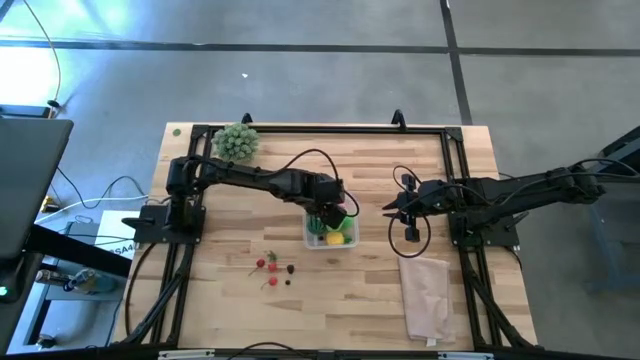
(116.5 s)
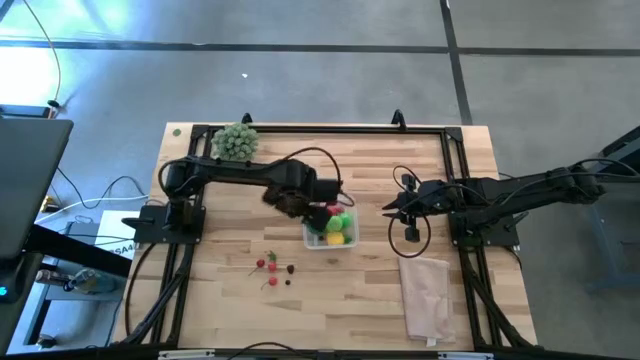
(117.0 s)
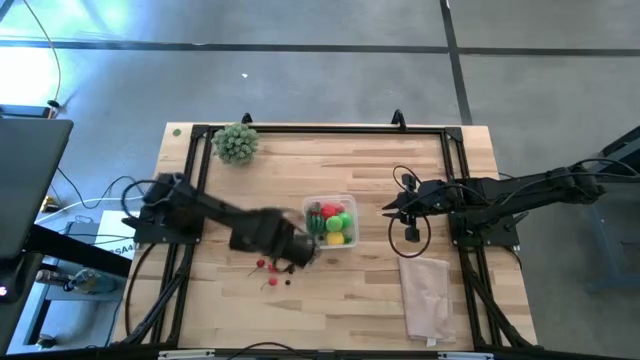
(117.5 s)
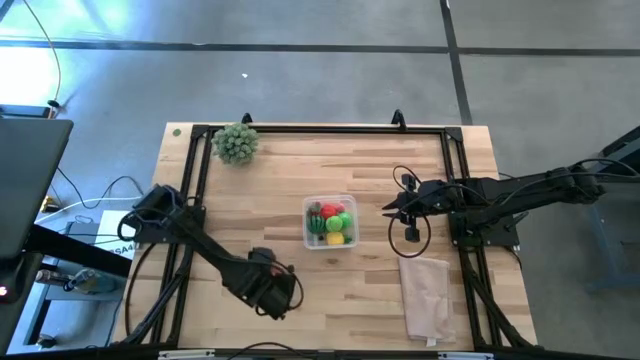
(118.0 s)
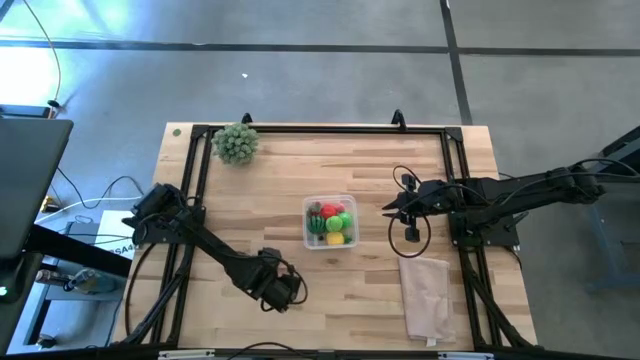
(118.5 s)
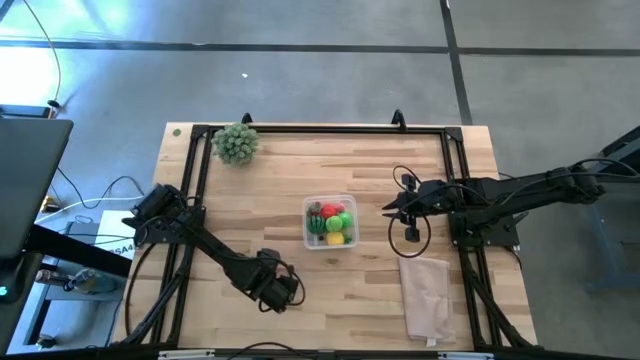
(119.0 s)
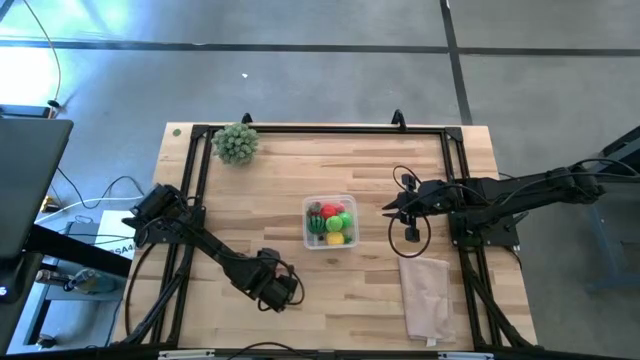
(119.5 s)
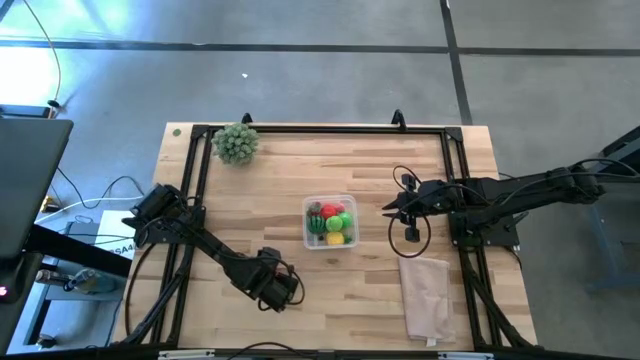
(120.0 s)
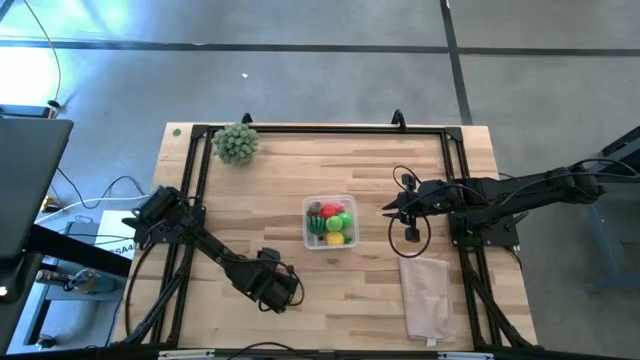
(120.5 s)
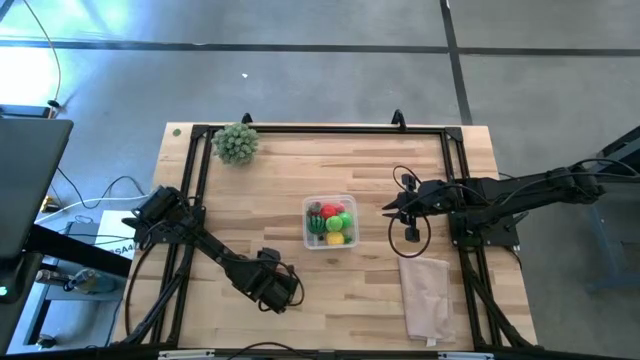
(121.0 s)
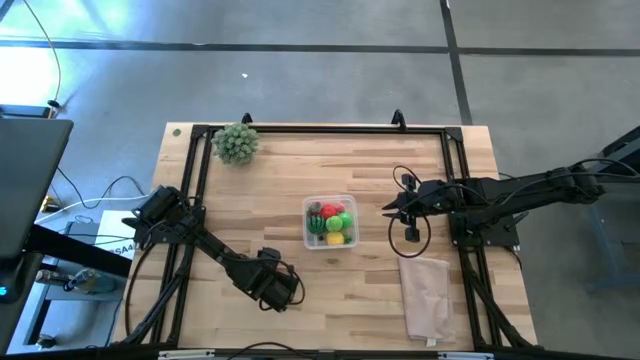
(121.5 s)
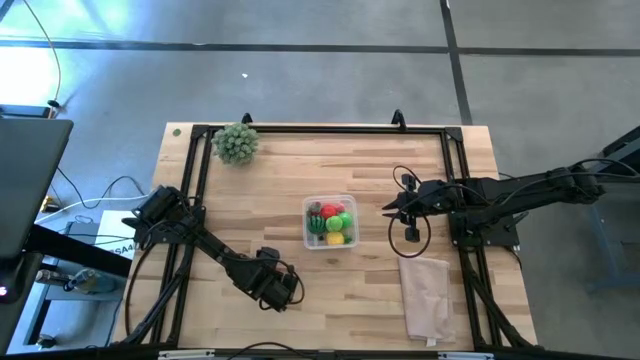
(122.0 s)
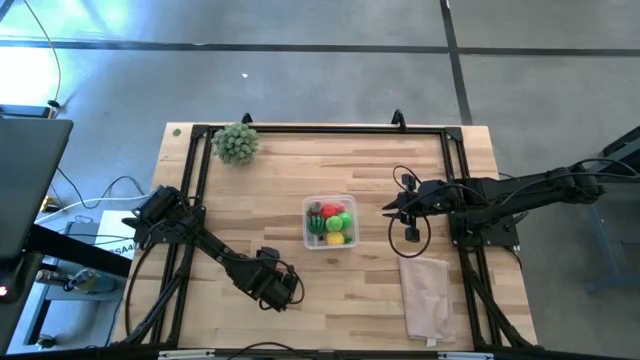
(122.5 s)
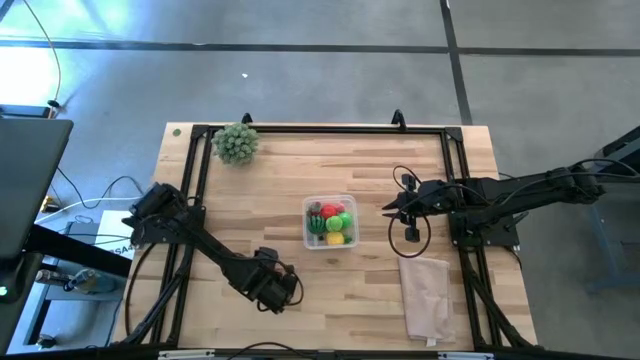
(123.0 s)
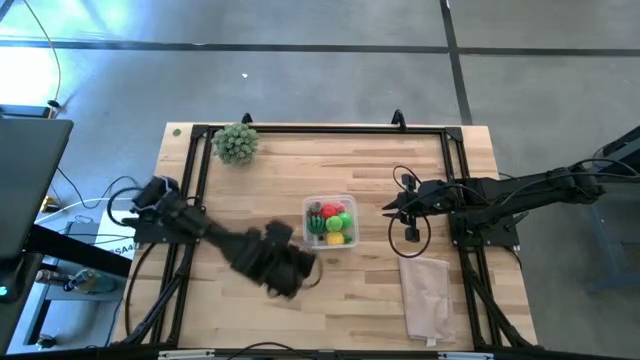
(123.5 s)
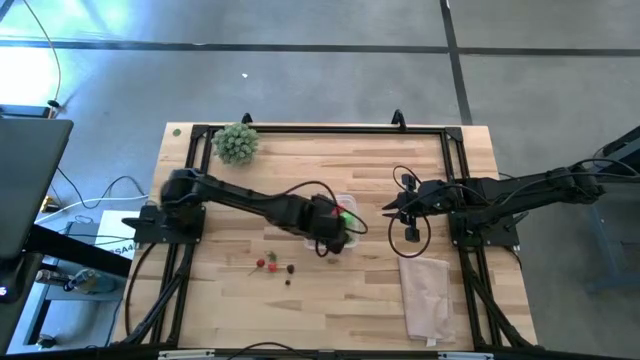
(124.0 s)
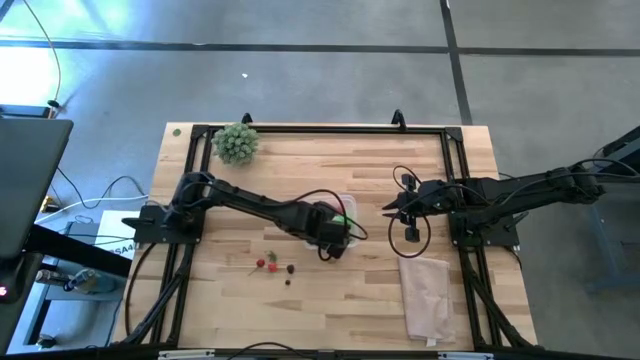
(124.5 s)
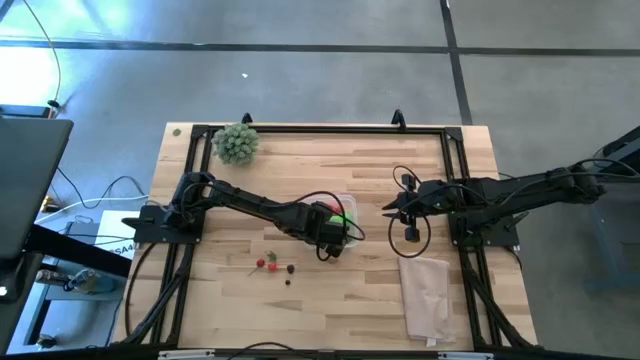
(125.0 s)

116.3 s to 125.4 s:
Task: Pick and placing Produce into tupperware
Put the bottom red cherry into the transparent bin

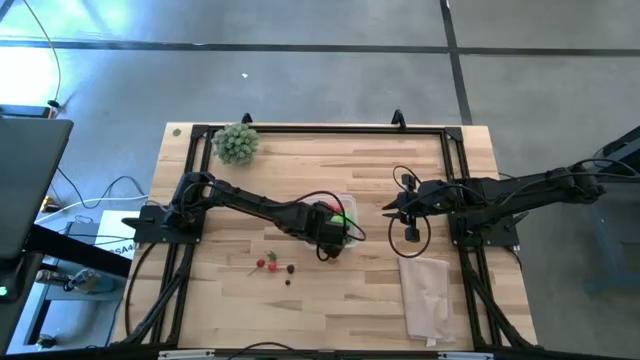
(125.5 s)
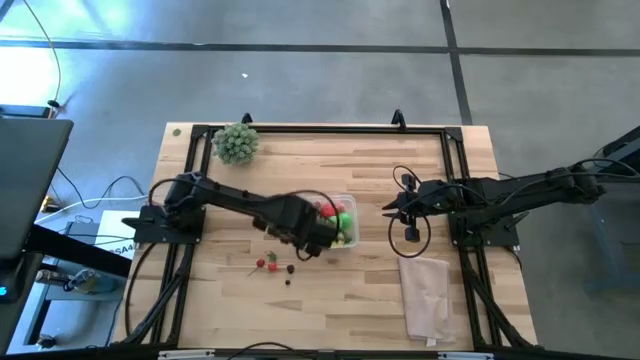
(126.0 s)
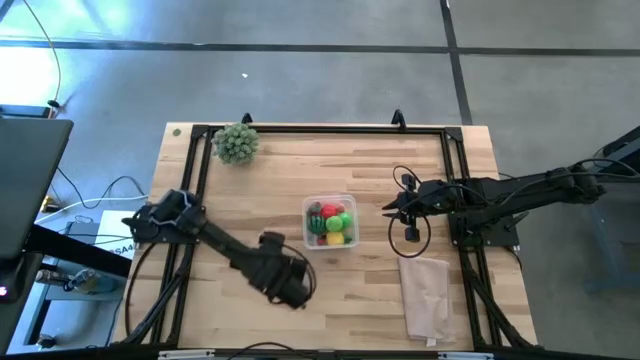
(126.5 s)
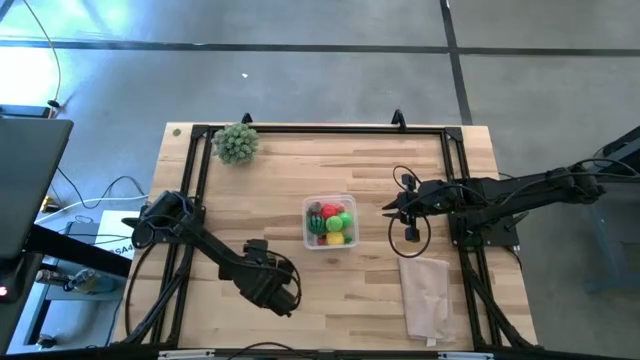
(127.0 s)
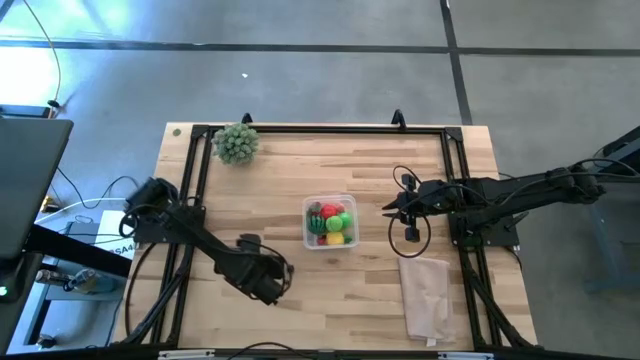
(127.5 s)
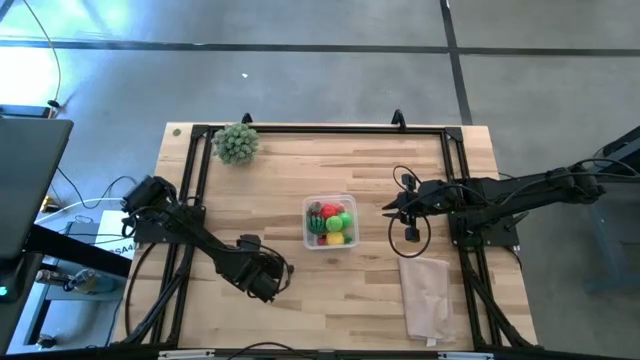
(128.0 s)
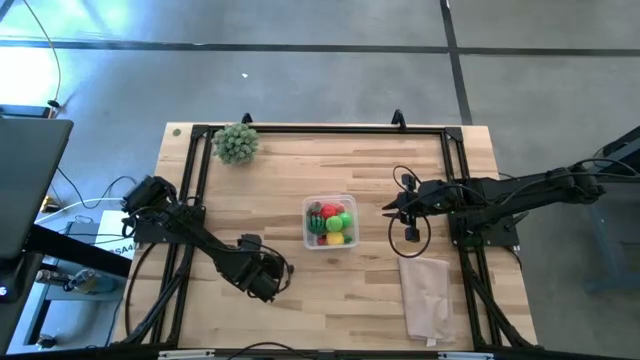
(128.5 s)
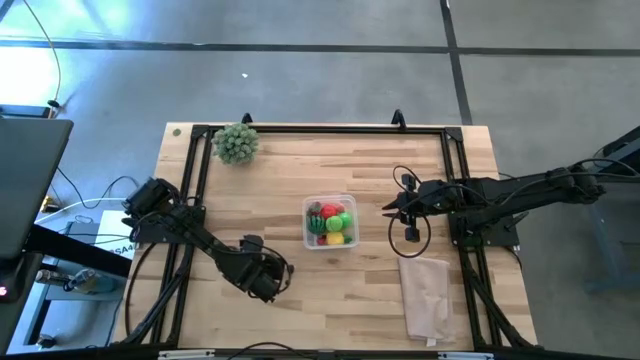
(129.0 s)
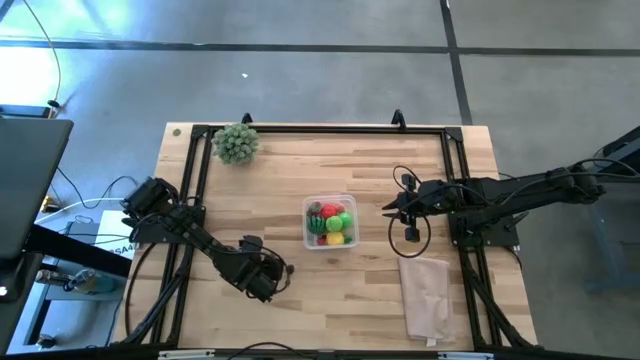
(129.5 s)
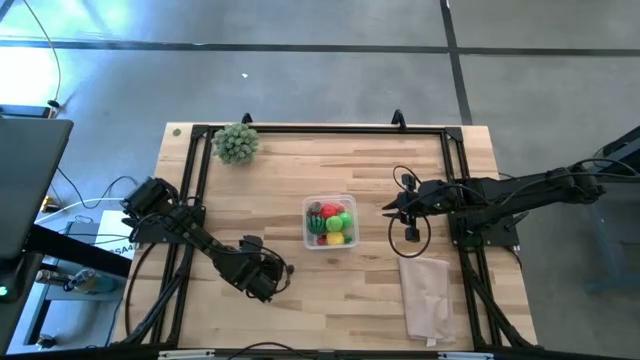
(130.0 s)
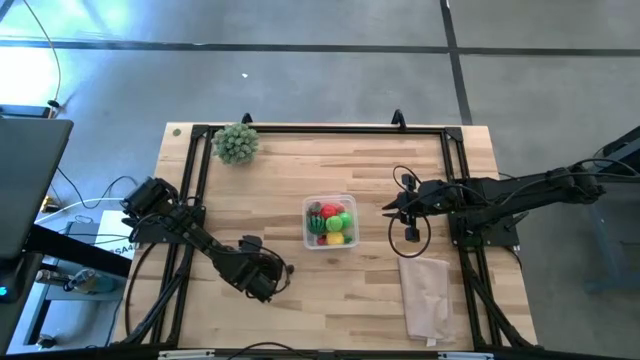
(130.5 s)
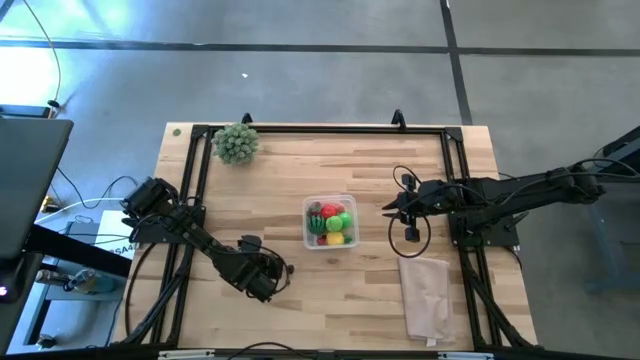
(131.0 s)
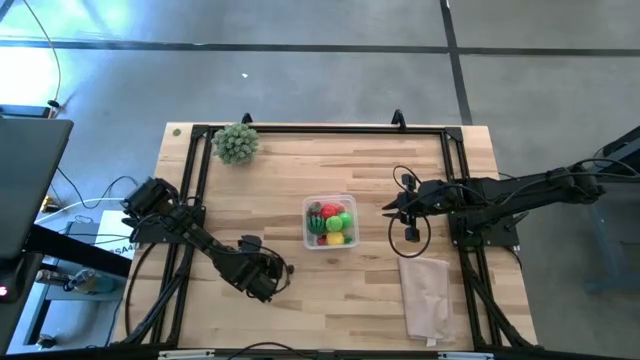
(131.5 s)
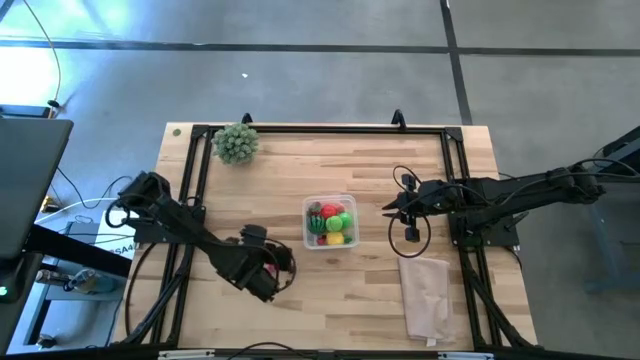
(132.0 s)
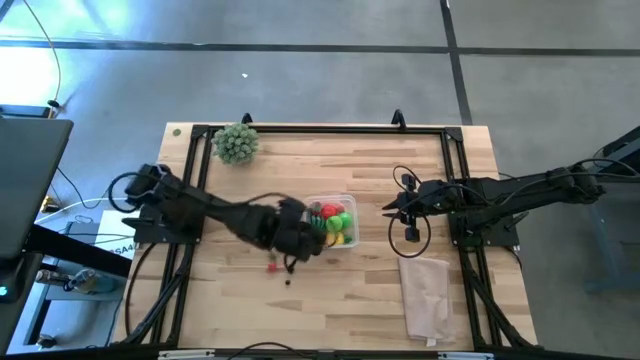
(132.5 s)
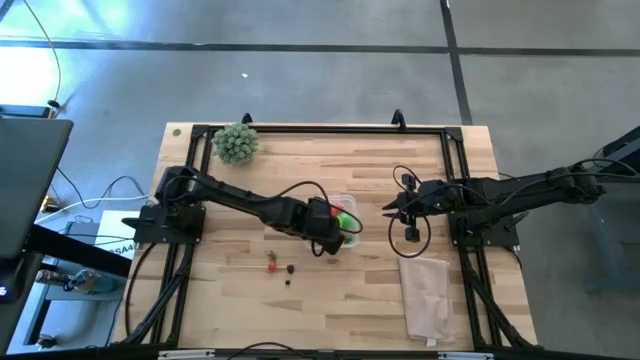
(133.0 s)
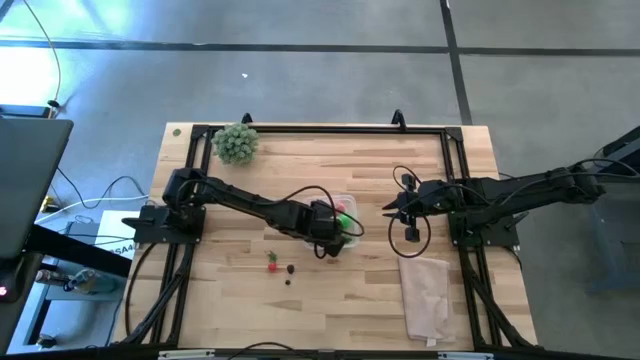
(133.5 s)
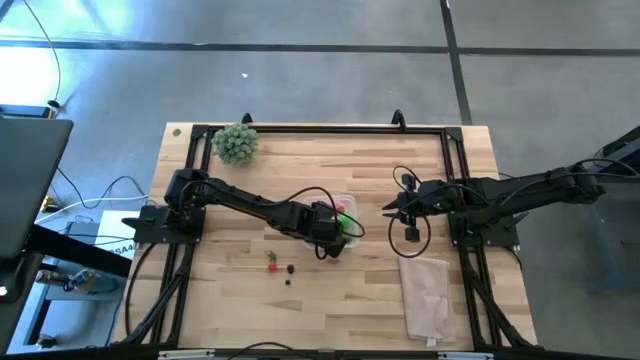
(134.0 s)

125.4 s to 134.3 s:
Put the left red cherry into the transparent bin

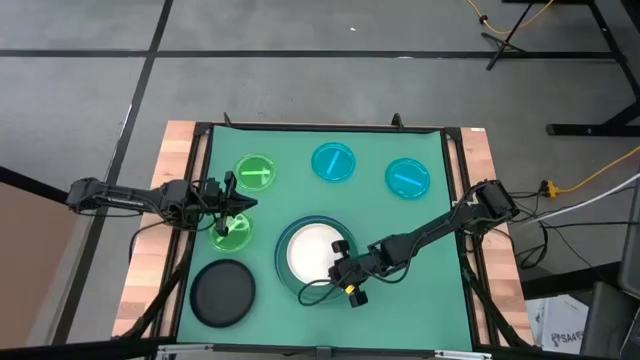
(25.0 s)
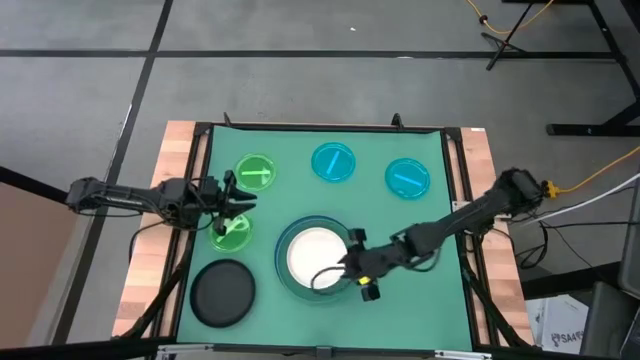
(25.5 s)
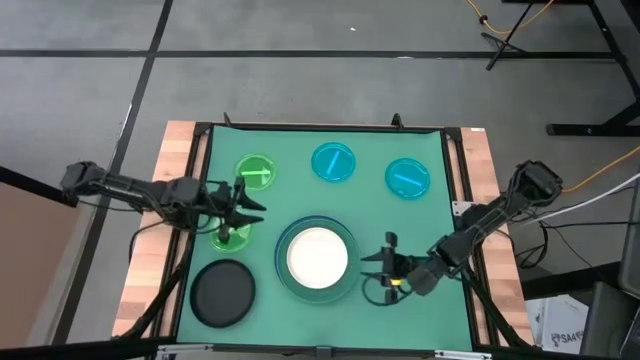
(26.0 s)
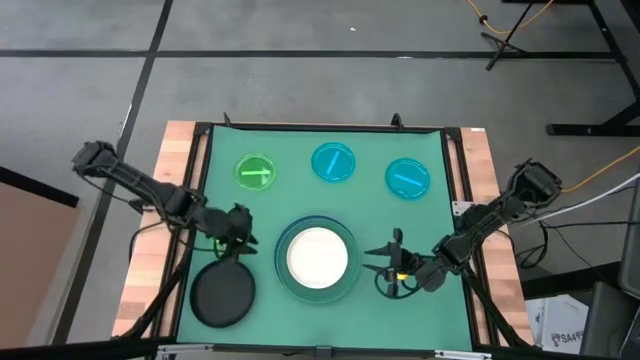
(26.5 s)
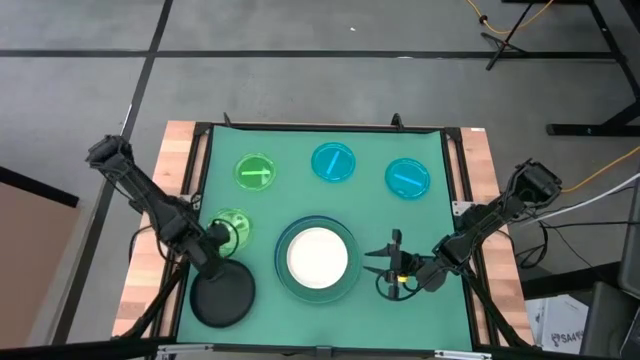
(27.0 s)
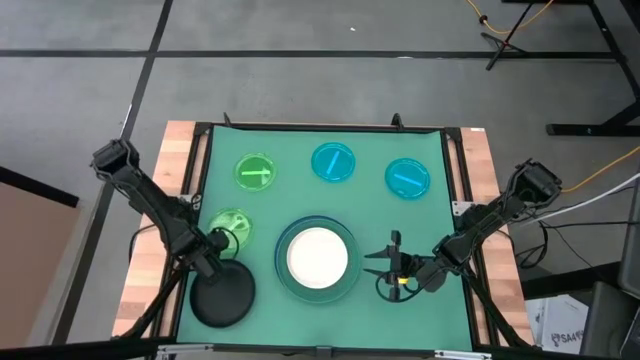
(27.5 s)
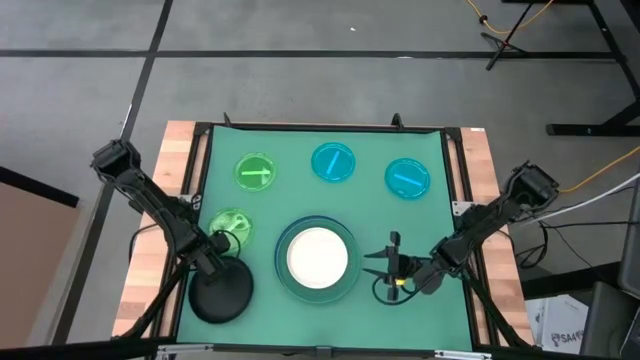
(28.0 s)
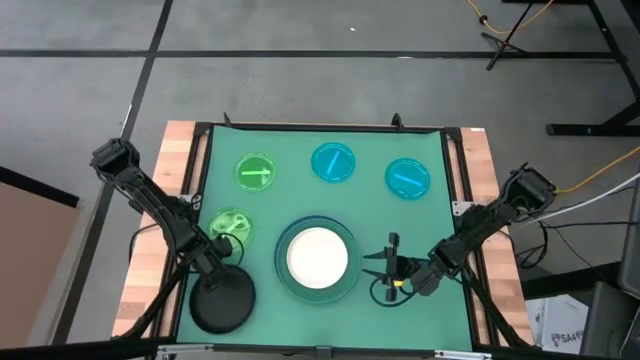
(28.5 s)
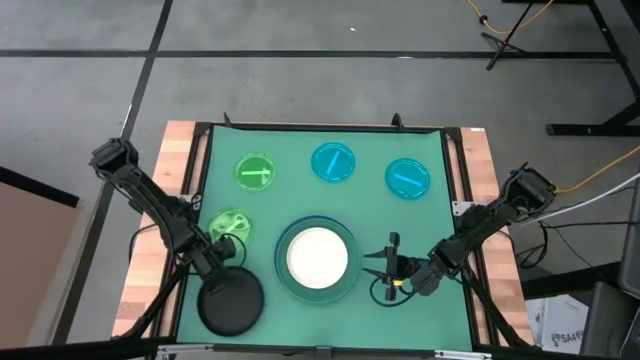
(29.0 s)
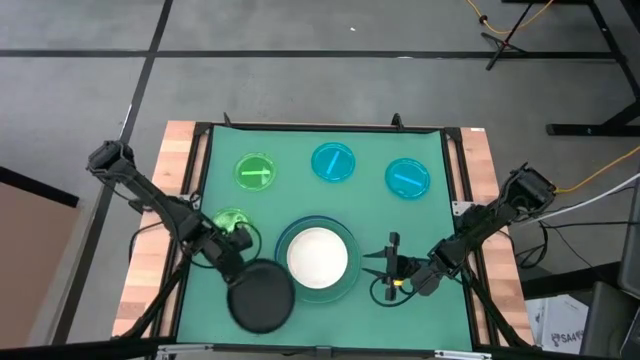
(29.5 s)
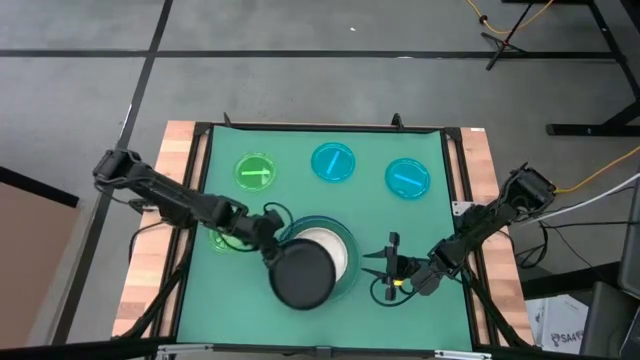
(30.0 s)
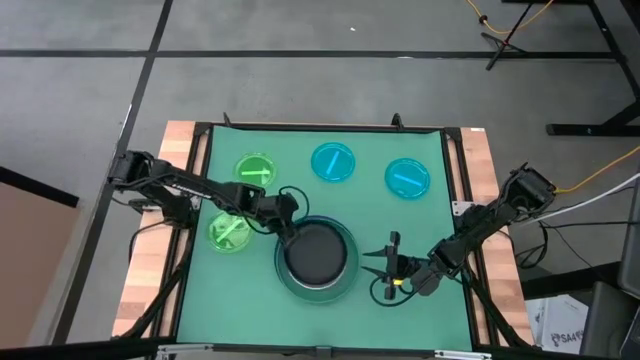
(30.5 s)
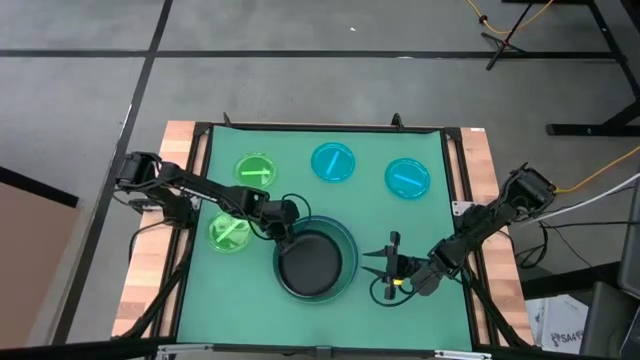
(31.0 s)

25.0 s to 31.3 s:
Task: Stack plastic plates
Stack the black plate on the pink plate
